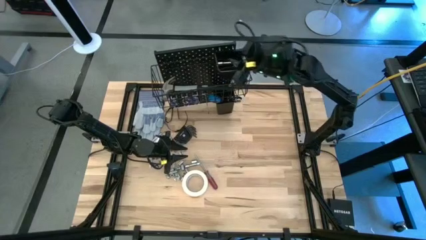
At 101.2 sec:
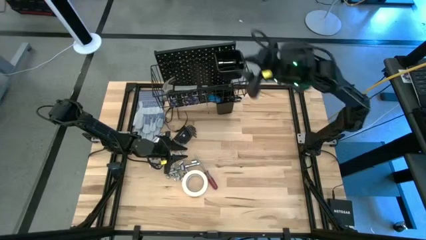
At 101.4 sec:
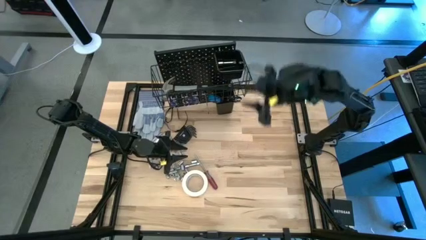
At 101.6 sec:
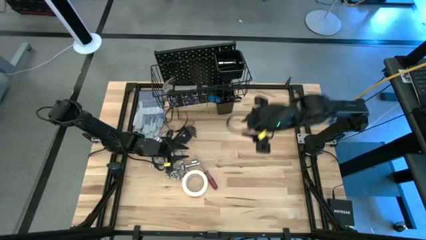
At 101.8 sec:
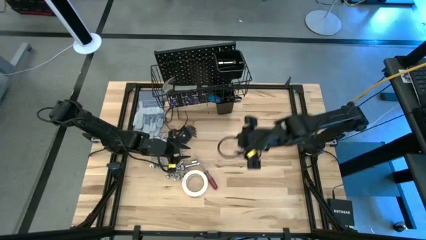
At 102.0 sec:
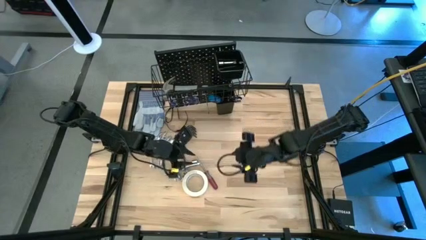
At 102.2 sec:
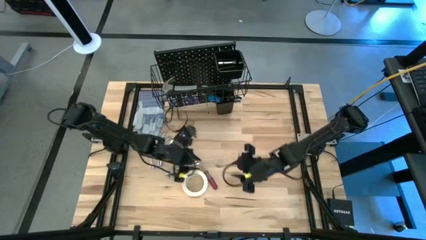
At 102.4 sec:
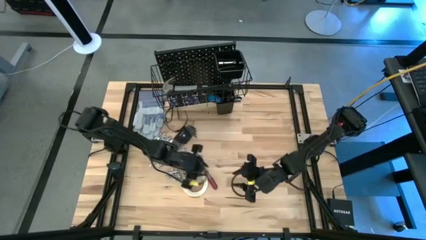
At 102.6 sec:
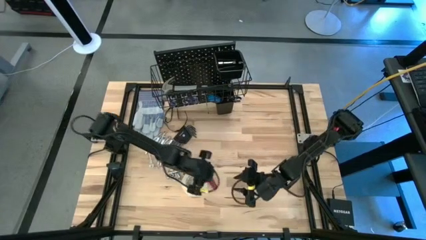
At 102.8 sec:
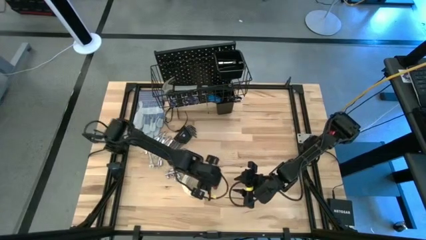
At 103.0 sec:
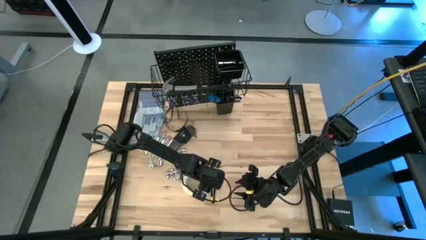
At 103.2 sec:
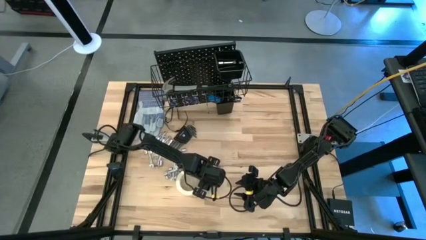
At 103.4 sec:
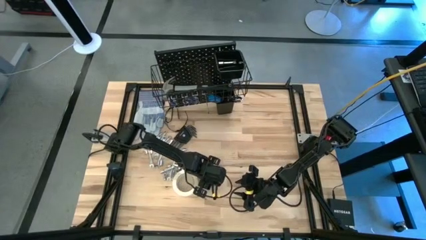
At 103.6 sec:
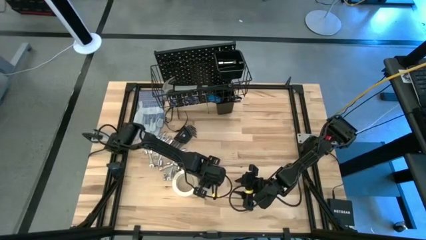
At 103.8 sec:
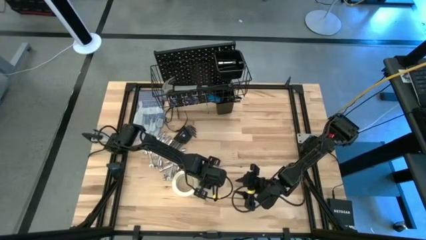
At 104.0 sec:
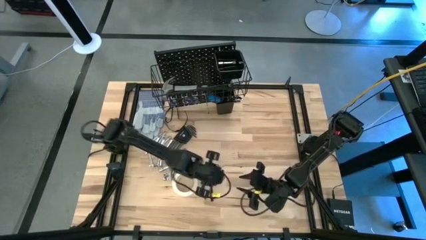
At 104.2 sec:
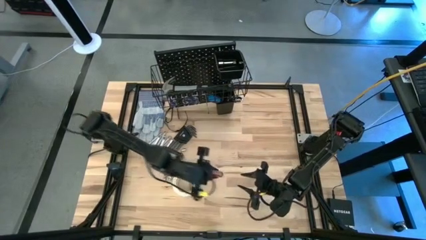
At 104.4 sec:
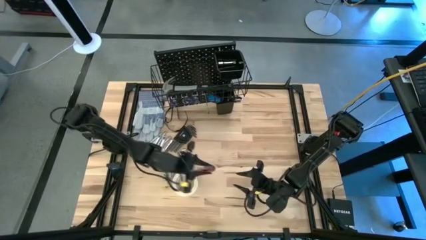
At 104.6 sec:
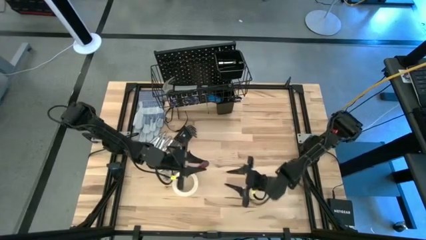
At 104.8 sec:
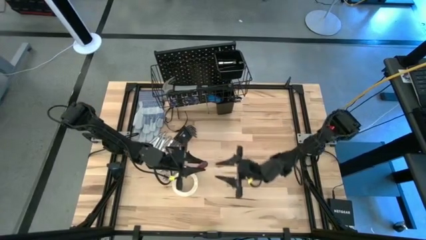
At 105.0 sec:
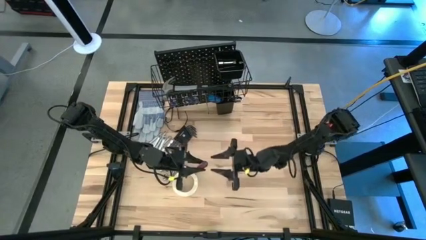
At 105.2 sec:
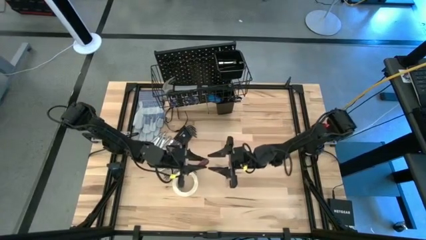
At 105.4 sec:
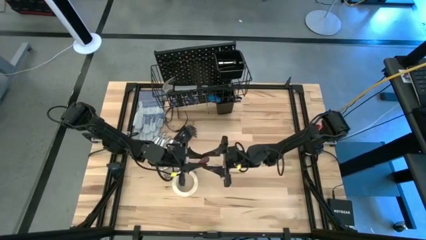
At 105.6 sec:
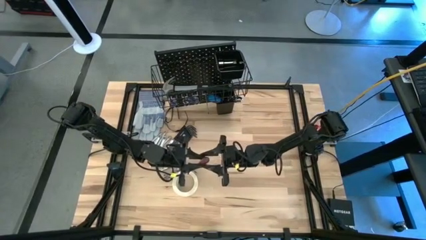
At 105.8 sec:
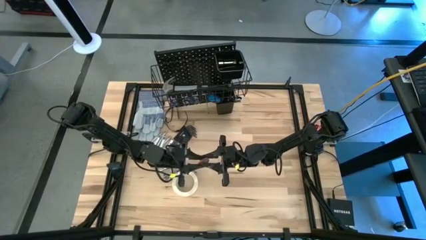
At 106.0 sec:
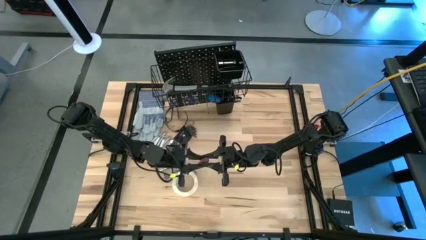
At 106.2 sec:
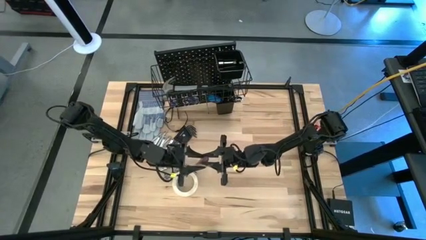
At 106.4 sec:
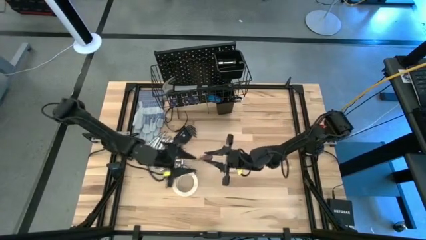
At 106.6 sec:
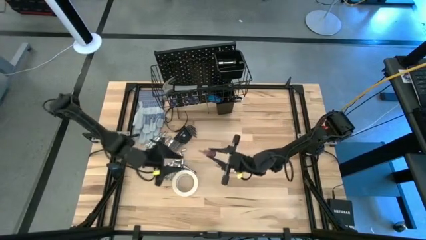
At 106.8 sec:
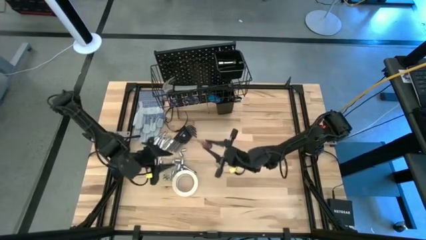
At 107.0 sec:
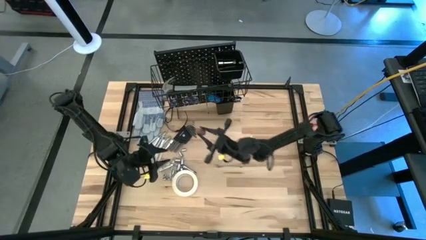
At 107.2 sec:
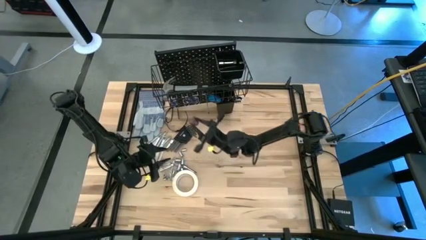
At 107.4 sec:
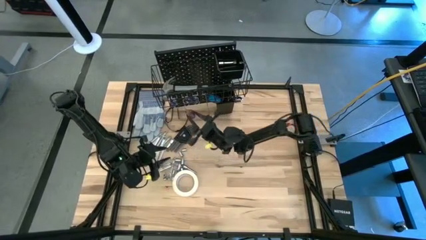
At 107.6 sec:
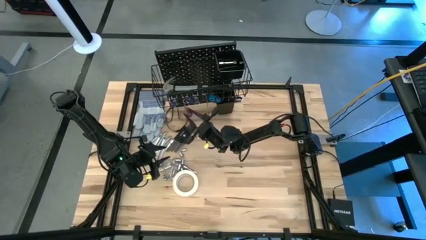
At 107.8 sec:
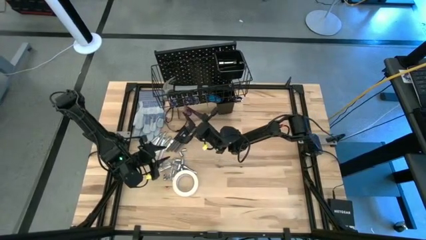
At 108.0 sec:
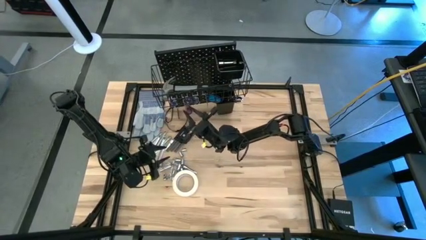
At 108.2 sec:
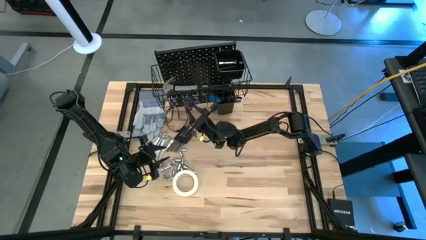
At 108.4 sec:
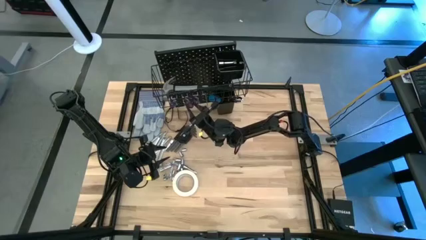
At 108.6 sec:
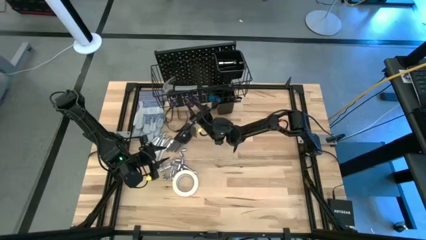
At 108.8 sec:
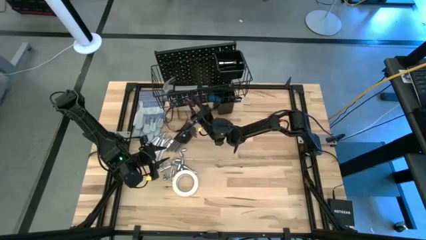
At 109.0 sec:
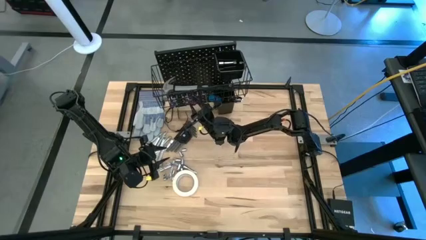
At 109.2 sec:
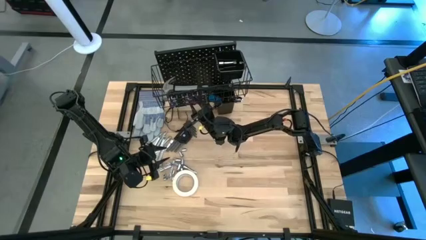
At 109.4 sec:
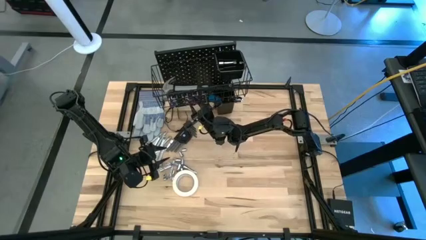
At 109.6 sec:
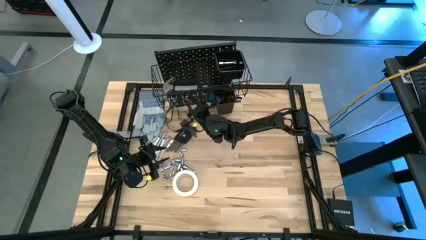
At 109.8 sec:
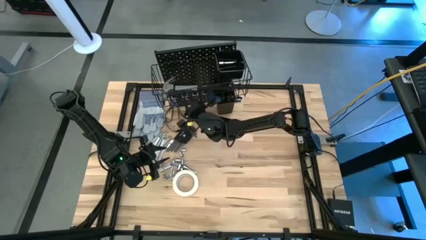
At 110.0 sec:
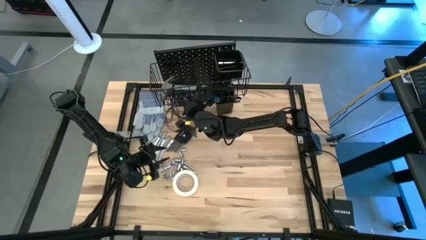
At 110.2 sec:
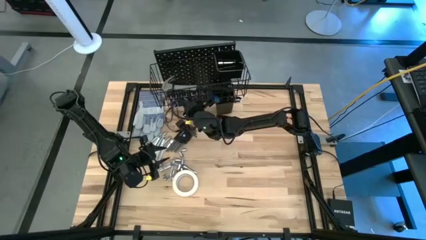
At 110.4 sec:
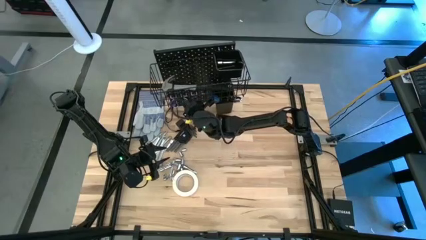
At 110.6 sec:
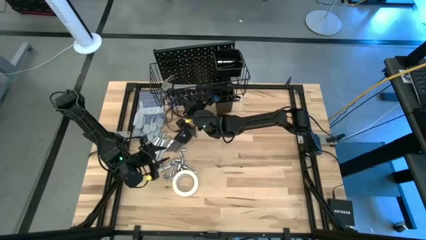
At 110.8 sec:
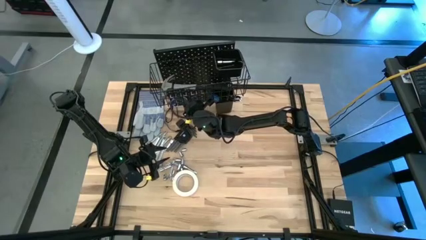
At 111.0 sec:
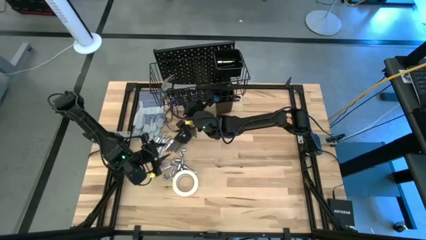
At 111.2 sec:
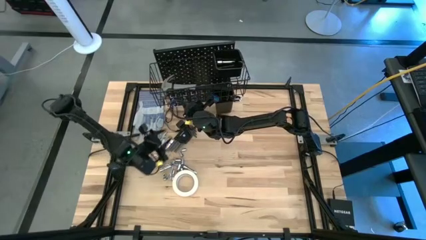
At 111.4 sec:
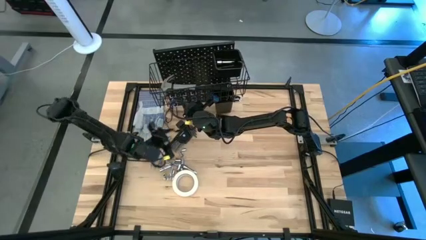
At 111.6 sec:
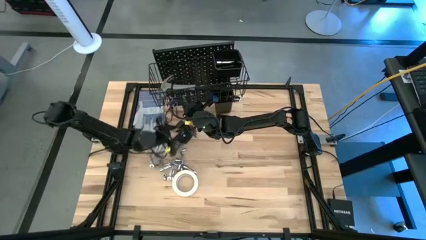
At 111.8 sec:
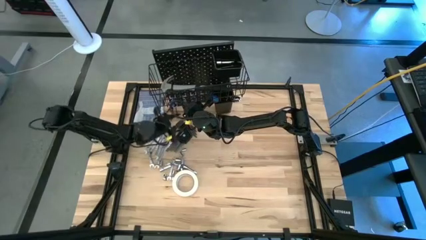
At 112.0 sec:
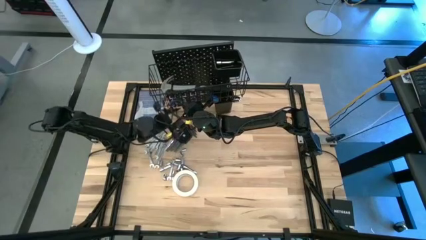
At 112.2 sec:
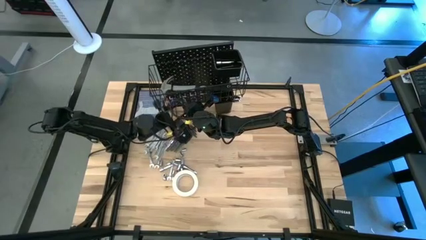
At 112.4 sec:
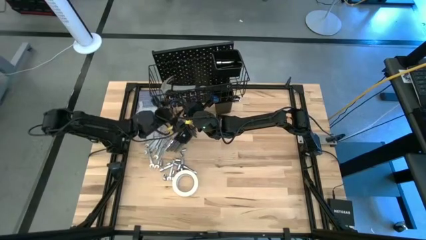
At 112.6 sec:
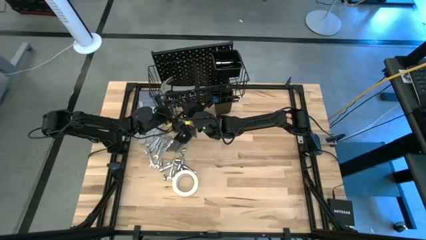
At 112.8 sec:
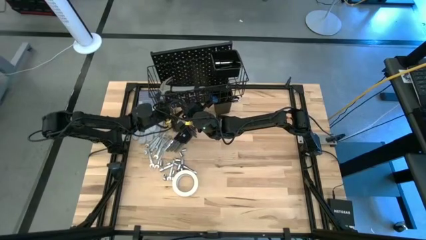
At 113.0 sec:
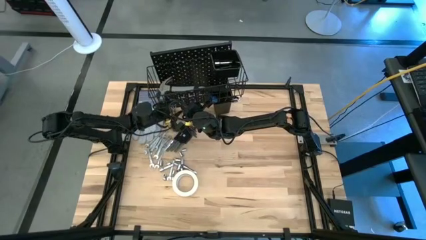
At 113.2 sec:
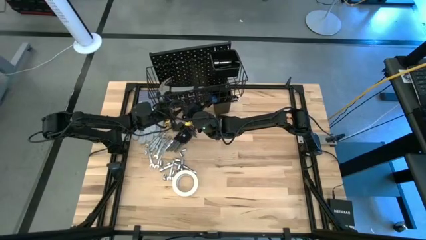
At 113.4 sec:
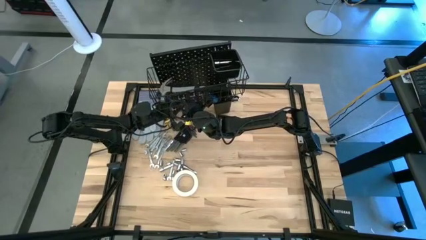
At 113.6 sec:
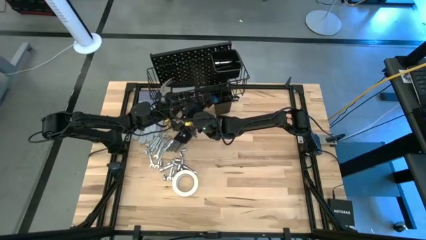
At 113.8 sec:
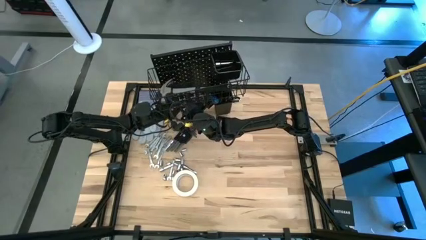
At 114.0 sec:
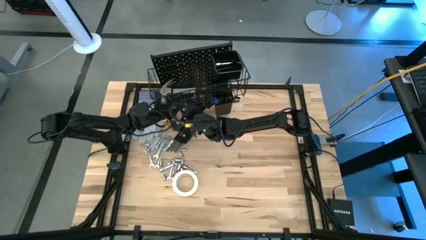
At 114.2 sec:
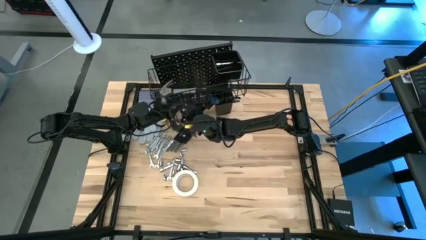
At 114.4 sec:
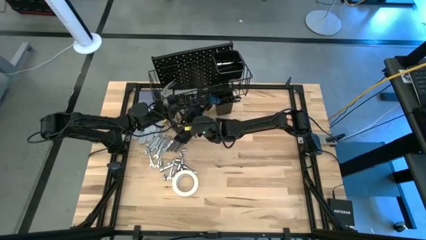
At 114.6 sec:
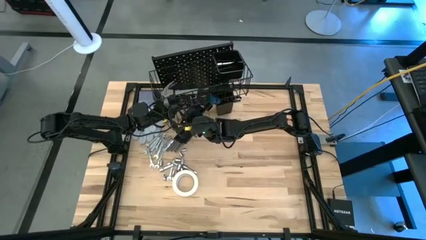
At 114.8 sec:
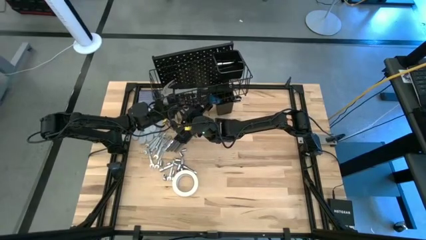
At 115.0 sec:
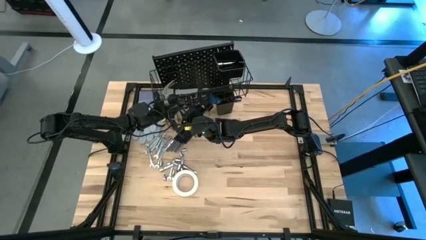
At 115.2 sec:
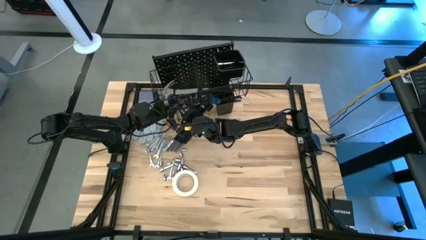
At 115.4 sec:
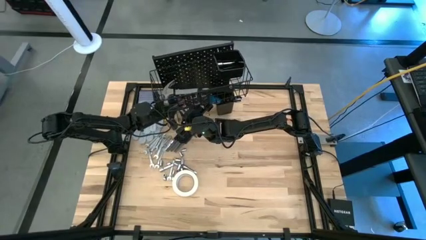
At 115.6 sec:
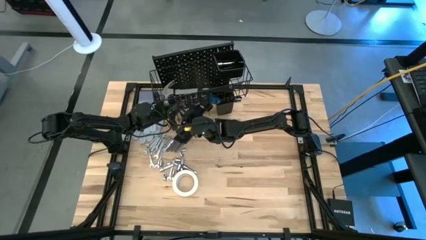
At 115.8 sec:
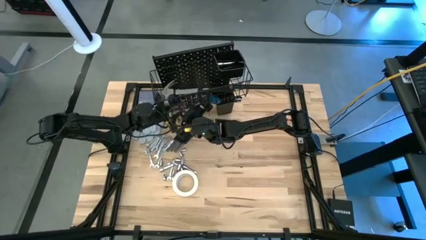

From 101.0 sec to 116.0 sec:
Task: Hang tools onto peg board
Hang the red screwdriver on the pegboard

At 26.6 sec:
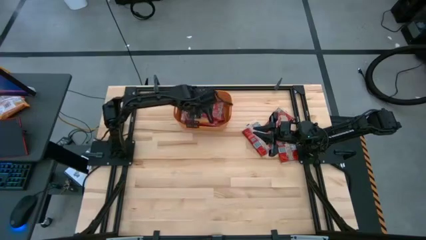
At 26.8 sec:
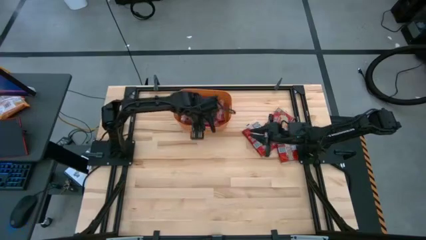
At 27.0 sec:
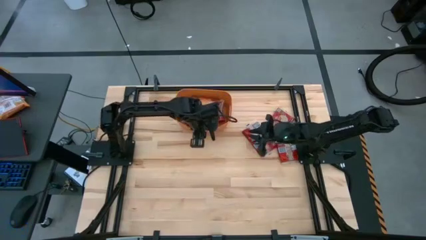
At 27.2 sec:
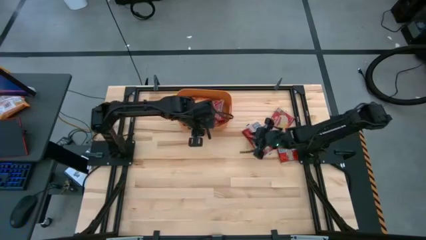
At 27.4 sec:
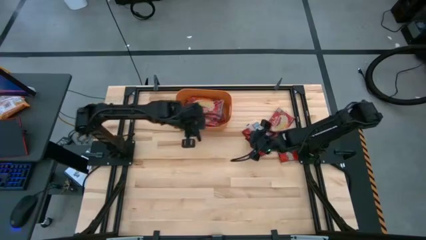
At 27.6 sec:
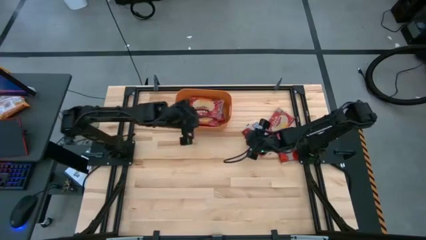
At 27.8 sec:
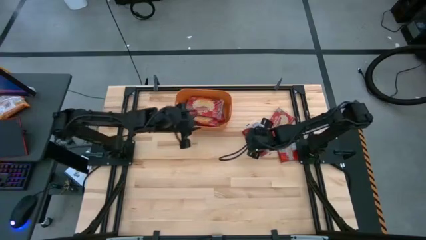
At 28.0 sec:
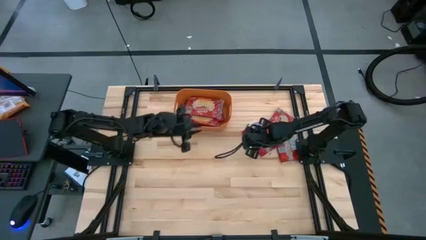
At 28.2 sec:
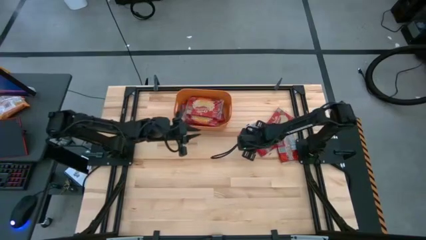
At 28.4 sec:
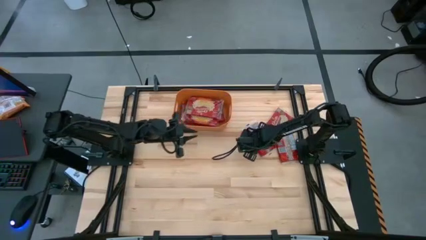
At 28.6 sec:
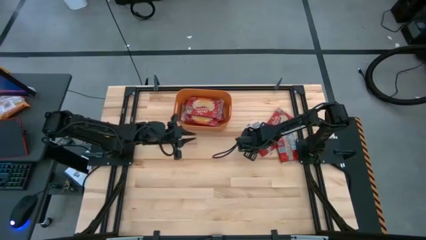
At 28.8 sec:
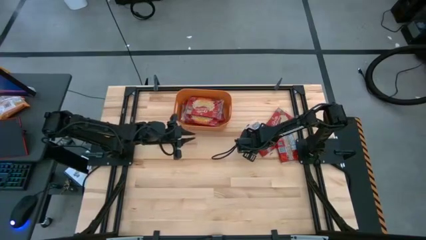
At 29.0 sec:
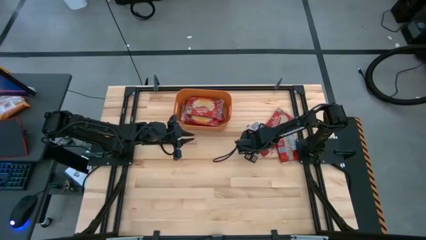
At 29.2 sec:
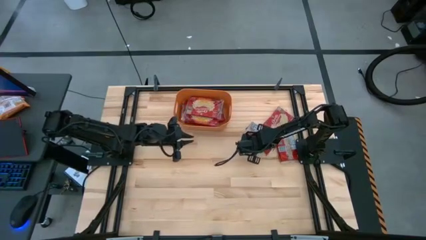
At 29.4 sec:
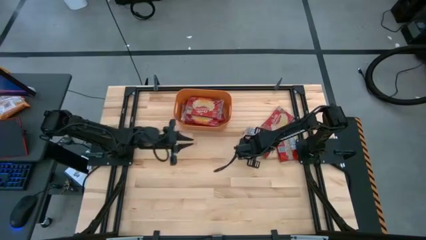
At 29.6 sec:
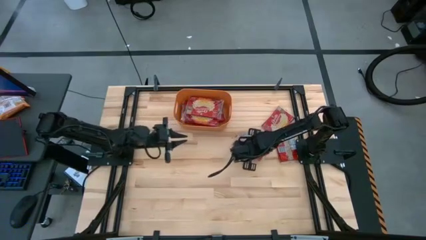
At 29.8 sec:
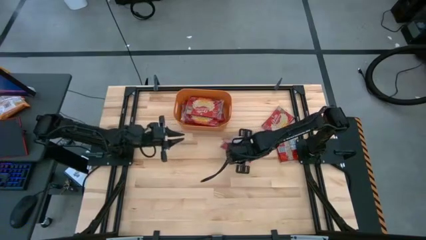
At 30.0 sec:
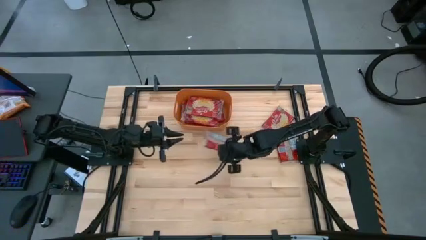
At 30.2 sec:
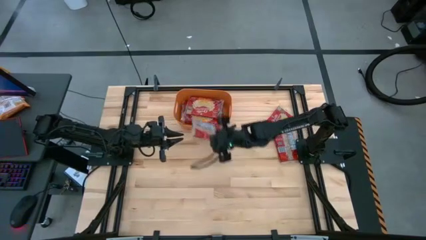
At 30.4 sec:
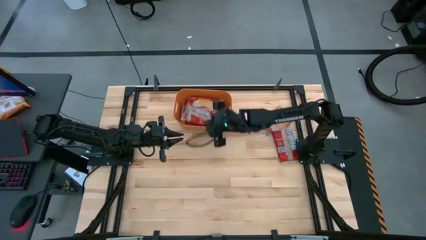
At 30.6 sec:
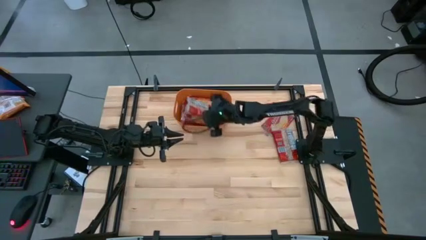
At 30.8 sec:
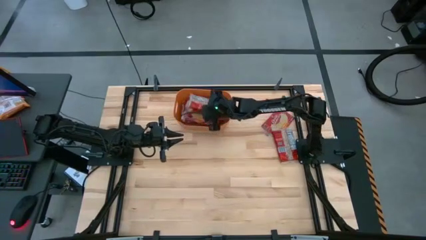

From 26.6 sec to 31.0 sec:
Task: Sort popcorn bags into baskets
Put the red popcorn bag into the orange bin
